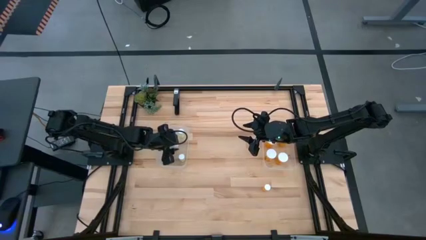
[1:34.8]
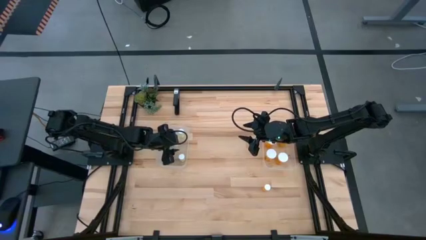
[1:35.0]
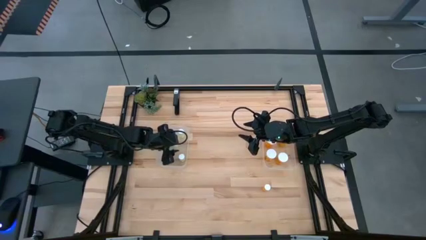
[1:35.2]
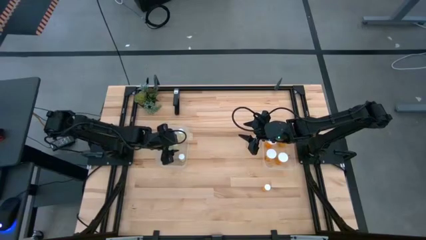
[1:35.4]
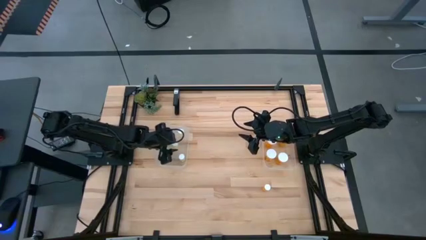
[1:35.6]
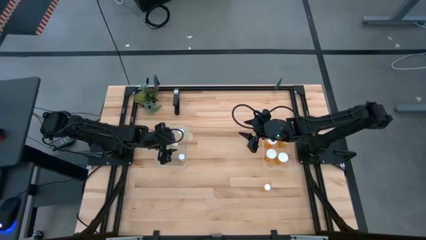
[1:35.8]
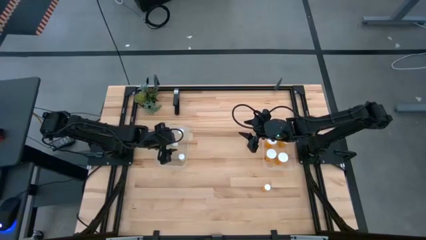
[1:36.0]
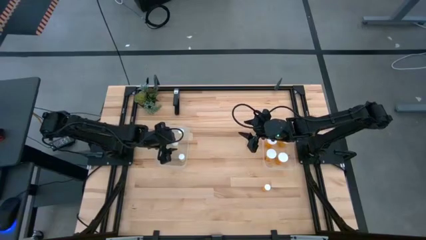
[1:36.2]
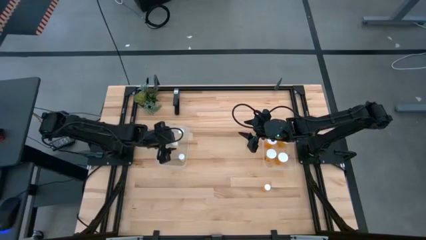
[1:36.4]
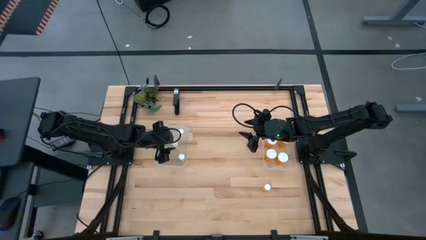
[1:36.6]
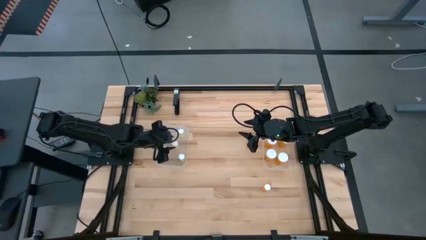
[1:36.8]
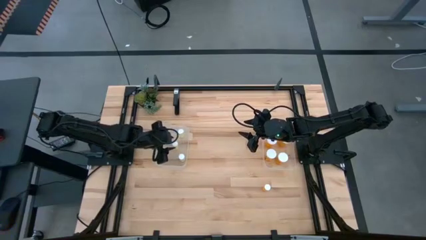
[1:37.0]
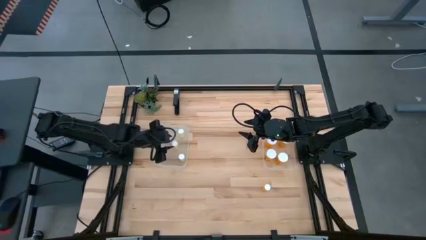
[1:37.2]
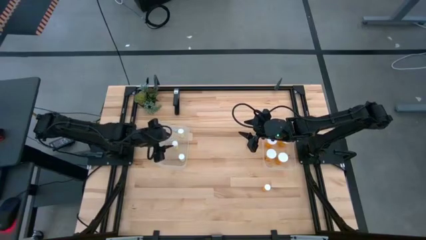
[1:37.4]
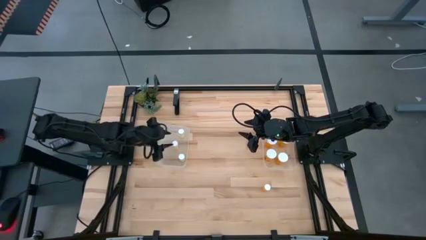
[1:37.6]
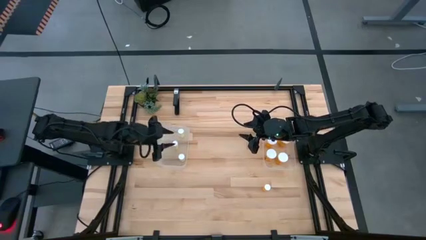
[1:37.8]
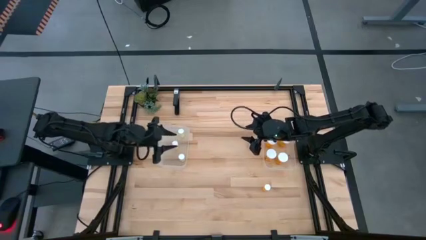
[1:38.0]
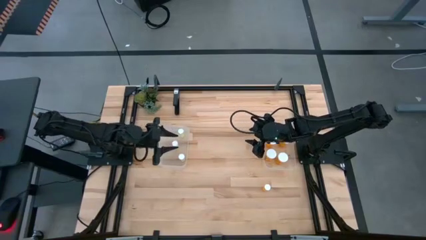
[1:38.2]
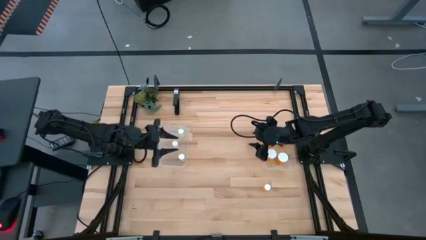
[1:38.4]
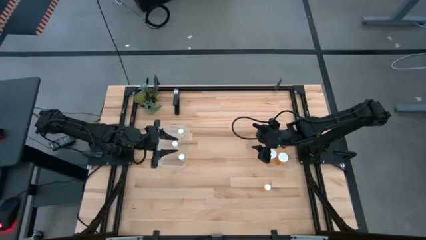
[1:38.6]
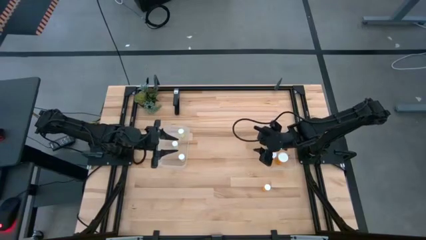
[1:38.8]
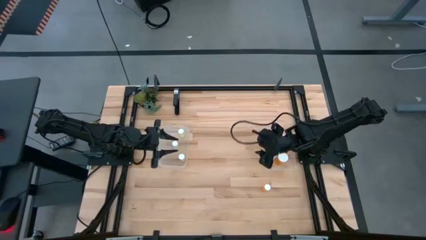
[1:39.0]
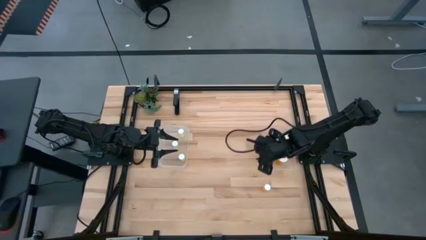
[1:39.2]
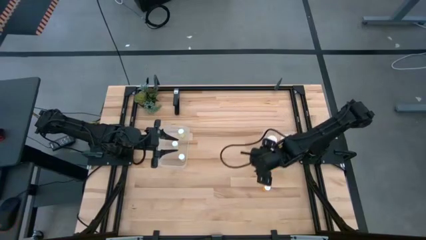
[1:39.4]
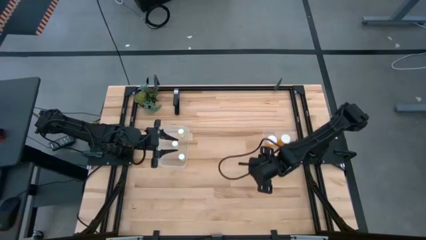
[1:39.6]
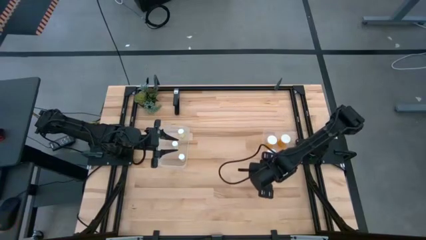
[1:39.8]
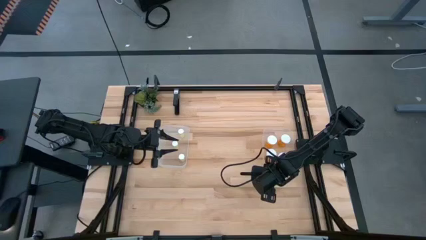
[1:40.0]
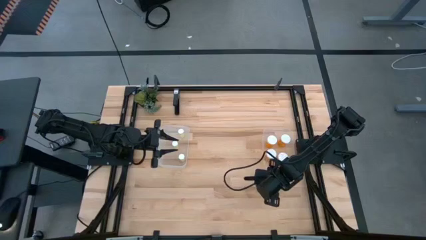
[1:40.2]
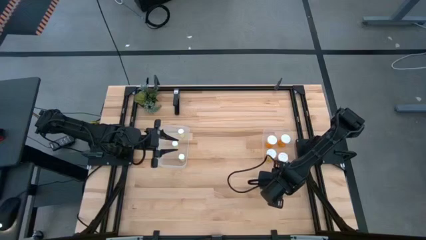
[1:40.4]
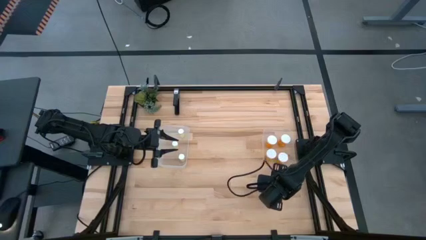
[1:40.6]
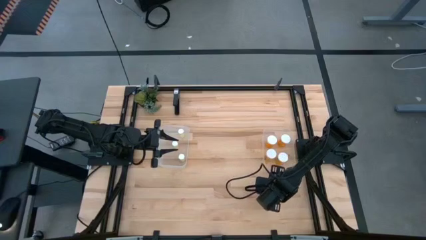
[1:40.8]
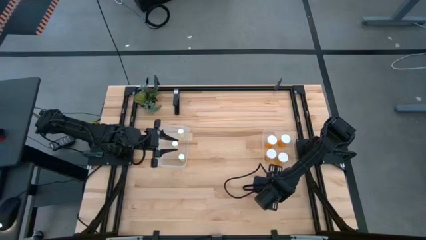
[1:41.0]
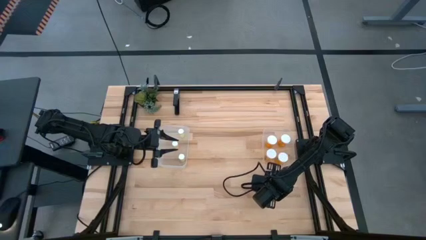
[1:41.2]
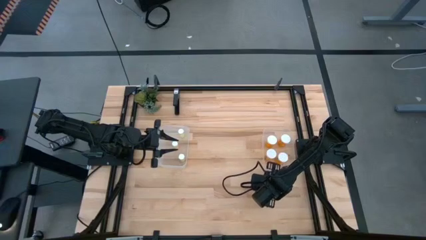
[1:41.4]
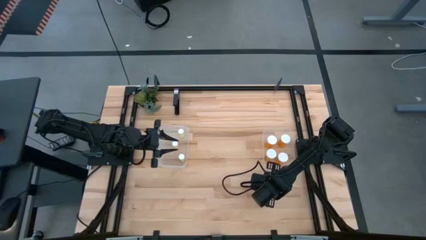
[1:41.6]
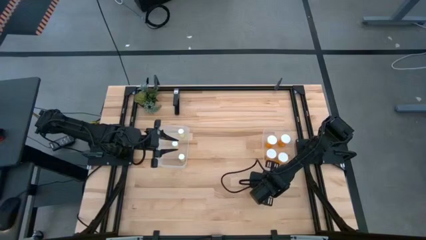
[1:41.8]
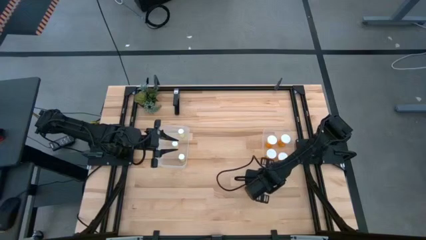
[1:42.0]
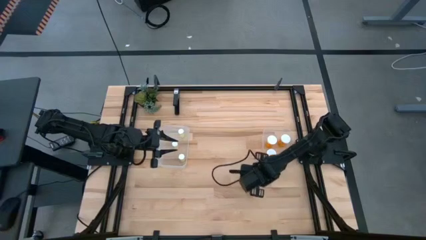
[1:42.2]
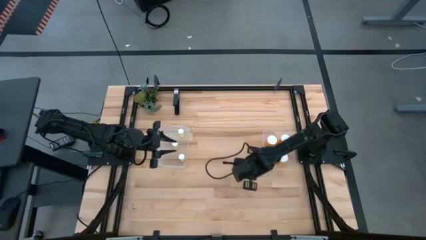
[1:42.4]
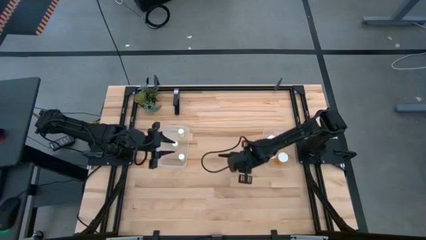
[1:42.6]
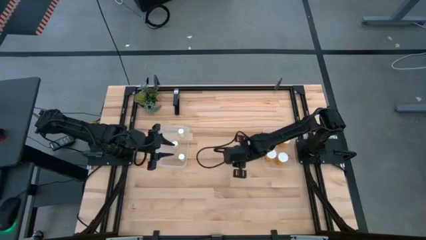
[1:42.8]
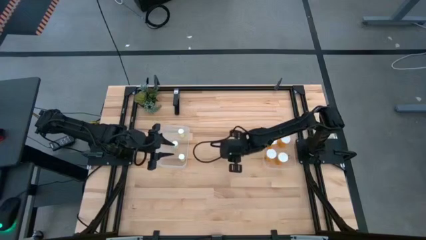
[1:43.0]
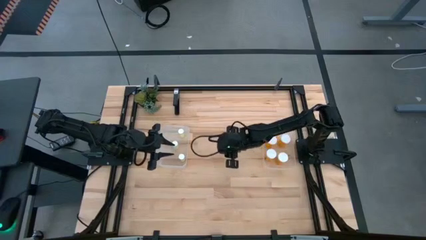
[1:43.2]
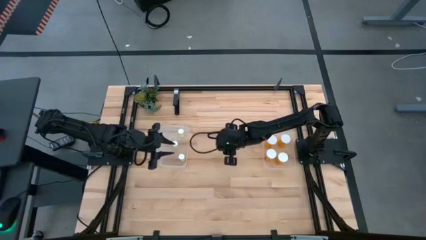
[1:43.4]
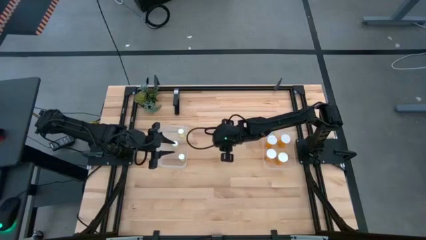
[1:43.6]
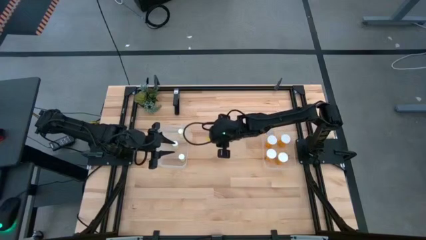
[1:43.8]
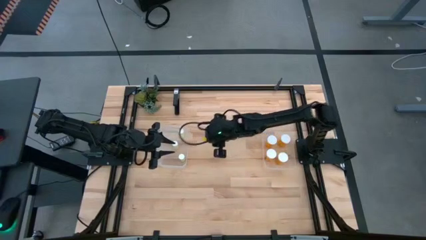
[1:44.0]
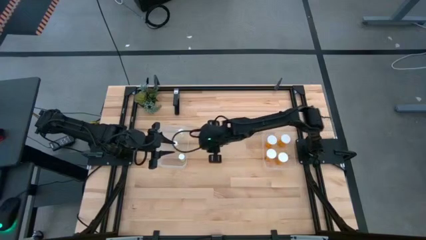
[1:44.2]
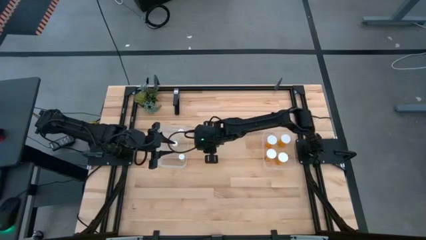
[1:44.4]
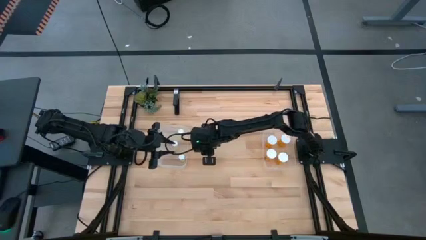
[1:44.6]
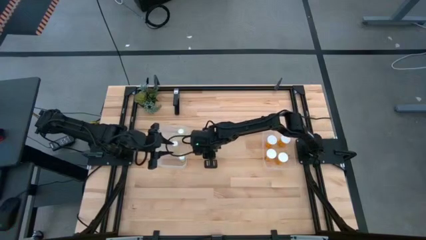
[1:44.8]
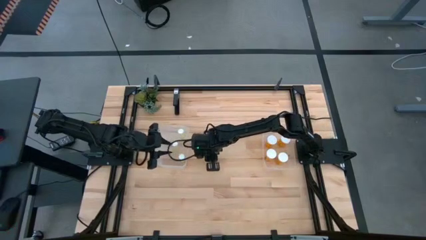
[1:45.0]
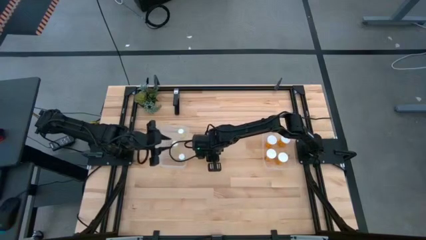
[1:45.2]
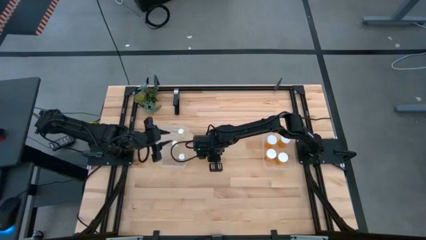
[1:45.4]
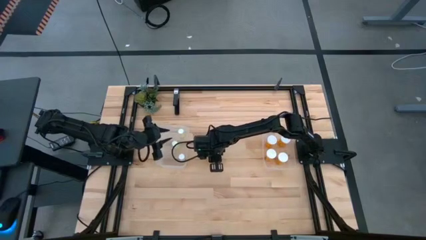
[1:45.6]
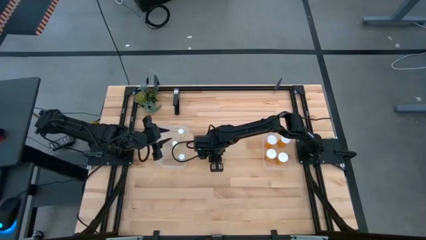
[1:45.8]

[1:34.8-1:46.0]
Task: Pick and place medicine bottles into bin by pill shape (circle, oval)
Move the orange pill bottle to the center of the table

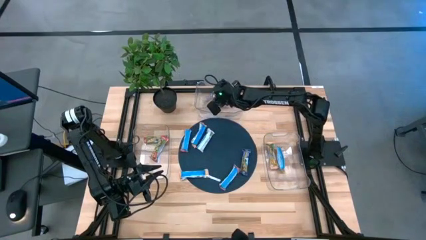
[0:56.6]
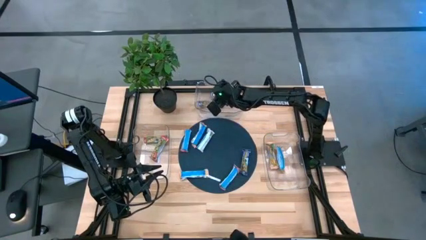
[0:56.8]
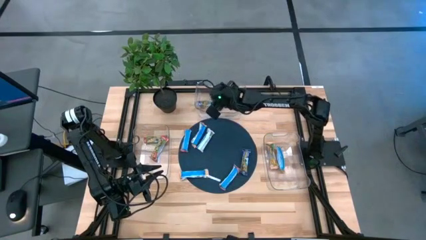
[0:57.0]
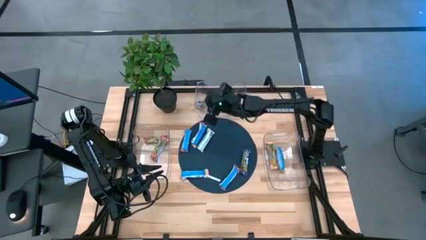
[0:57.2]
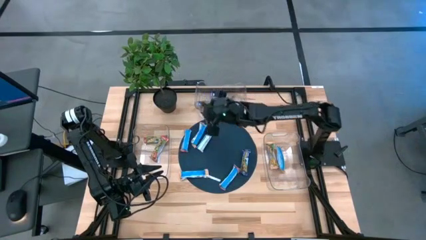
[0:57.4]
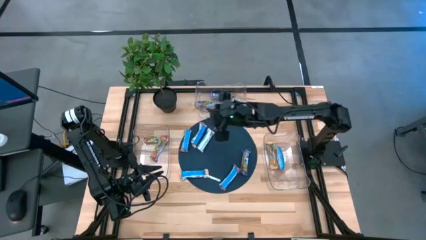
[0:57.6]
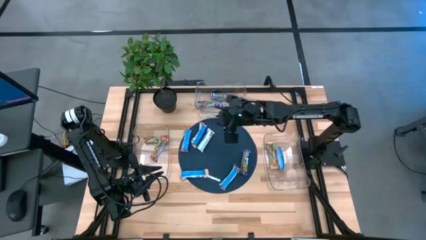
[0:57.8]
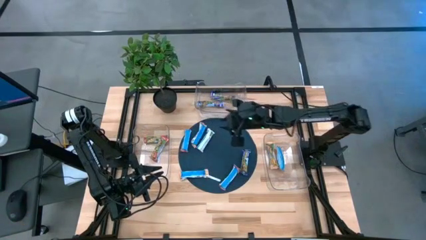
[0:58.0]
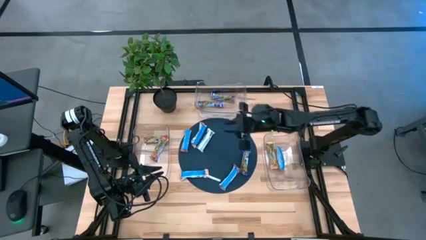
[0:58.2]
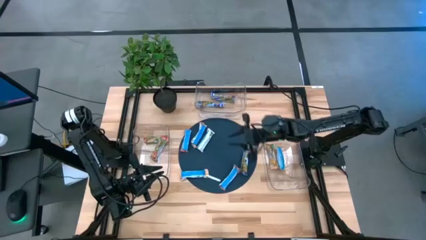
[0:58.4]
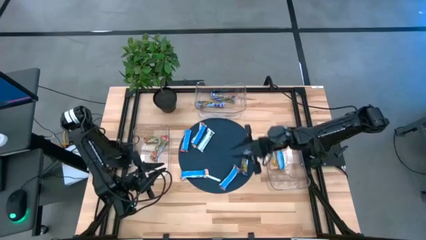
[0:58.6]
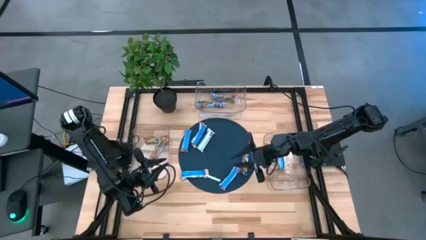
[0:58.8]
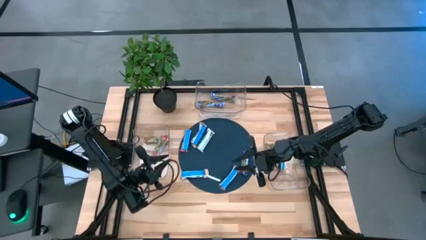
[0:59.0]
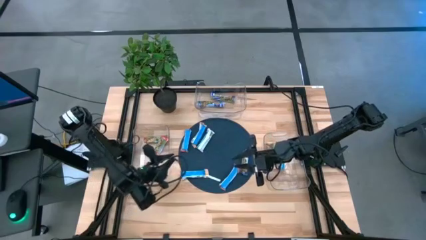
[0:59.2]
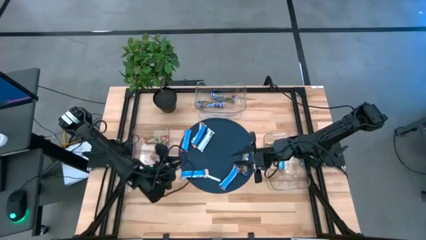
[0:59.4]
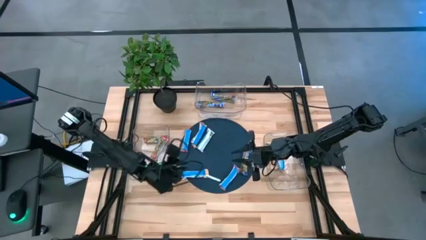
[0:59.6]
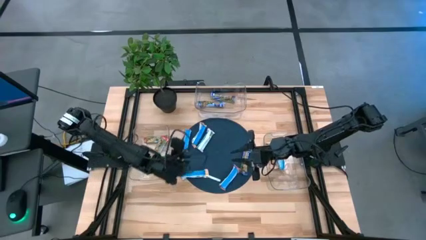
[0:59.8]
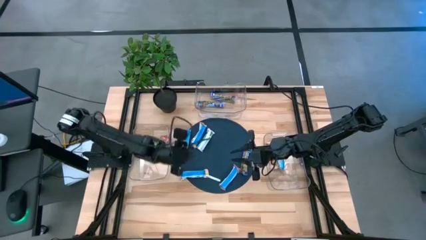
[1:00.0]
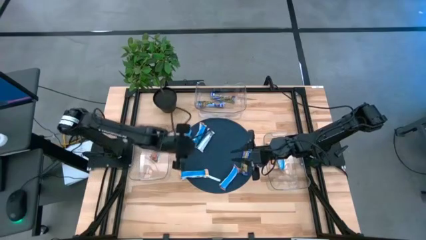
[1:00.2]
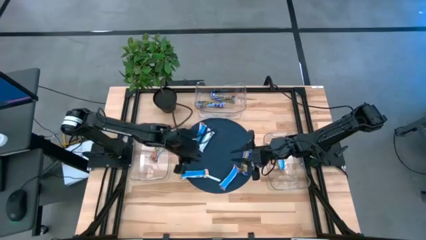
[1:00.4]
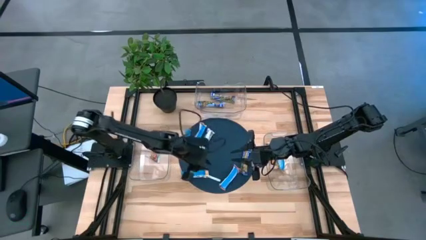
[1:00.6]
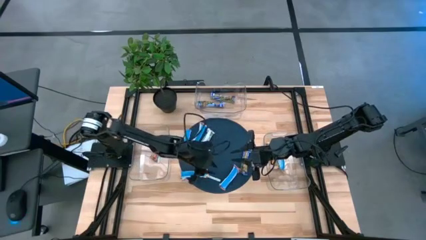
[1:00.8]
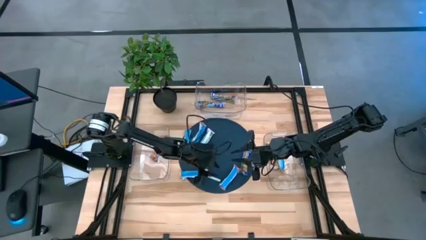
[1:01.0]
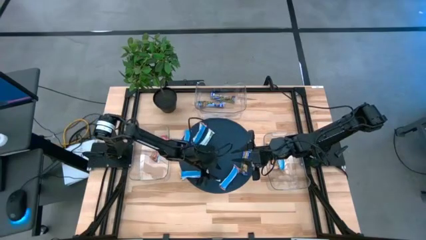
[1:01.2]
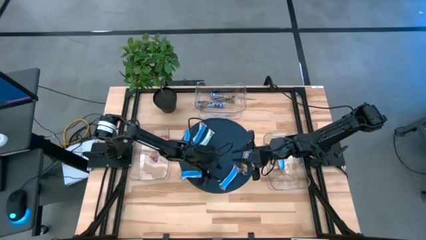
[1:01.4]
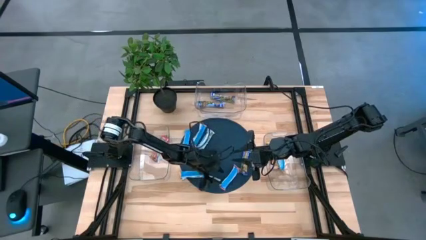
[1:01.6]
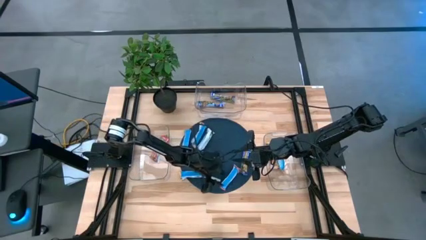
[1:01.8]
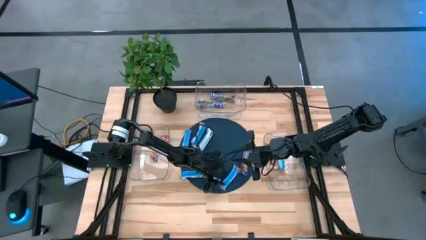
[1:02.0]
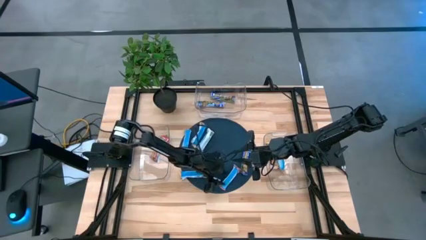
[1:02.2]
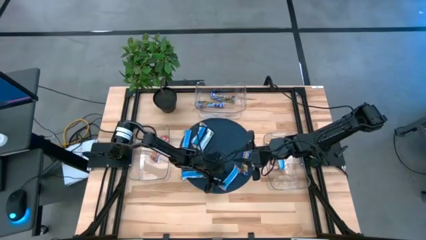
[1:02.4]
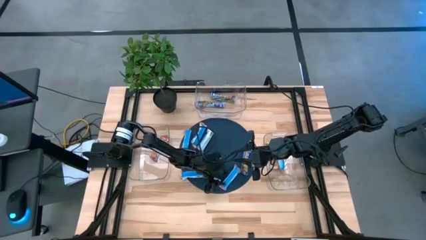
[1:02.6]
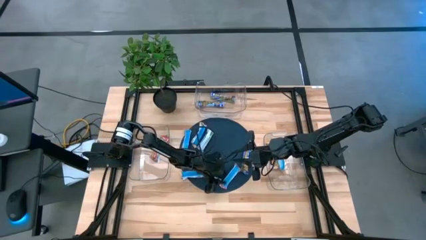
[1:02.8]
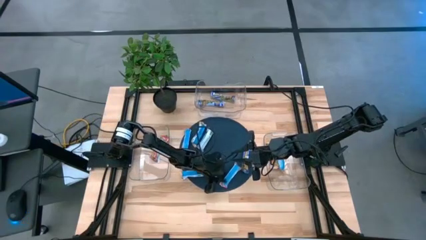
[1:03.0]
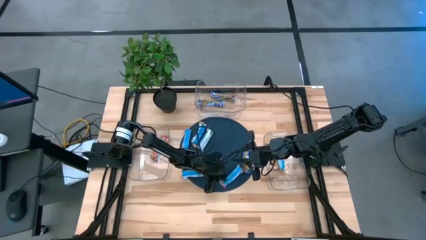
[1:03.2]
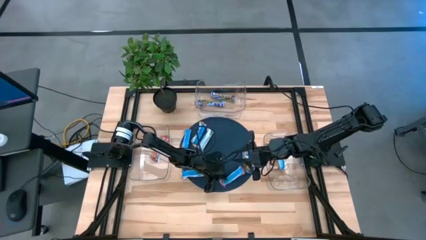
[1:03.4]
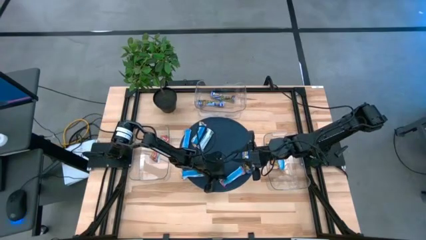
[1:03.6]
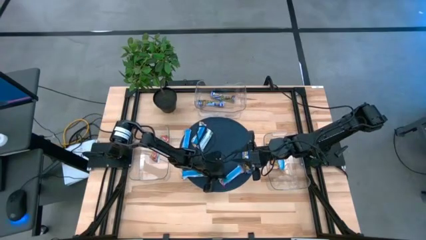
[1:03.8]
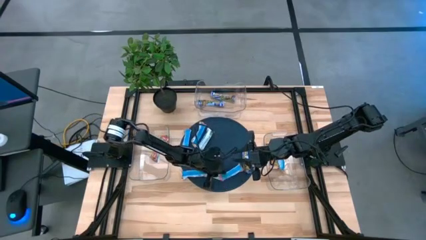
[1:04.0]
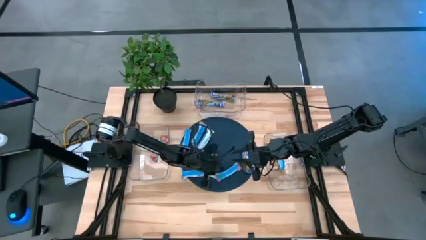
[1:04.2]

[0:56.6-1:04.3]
Task: Pick and place Granola Bars by type
Put the bottom red granola bar into the left transparent bin
